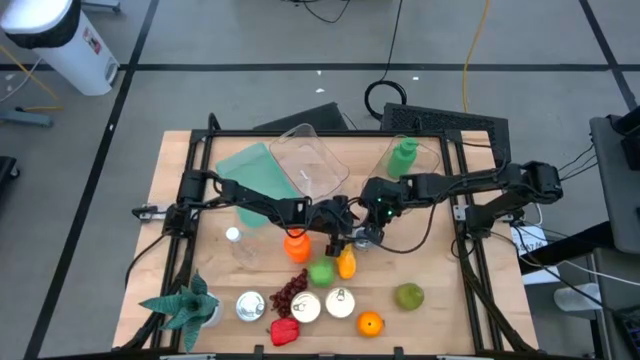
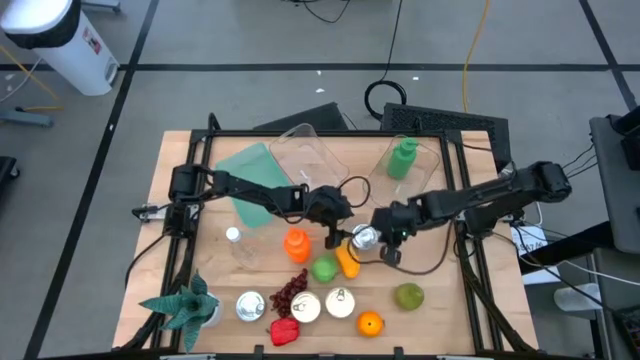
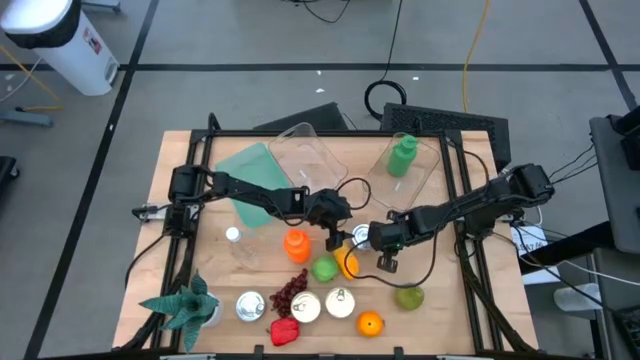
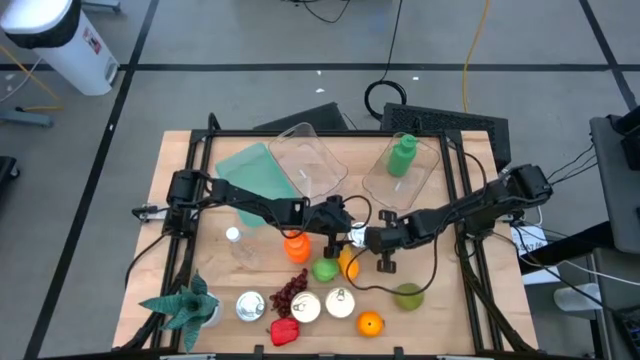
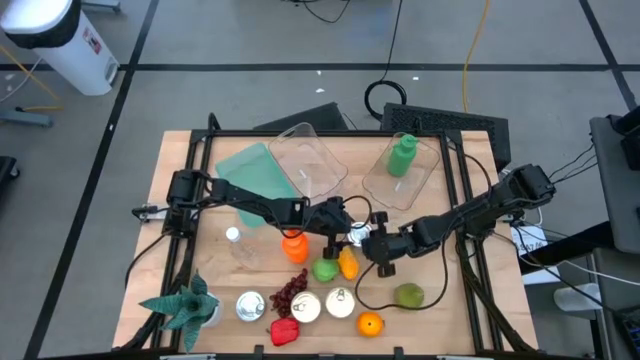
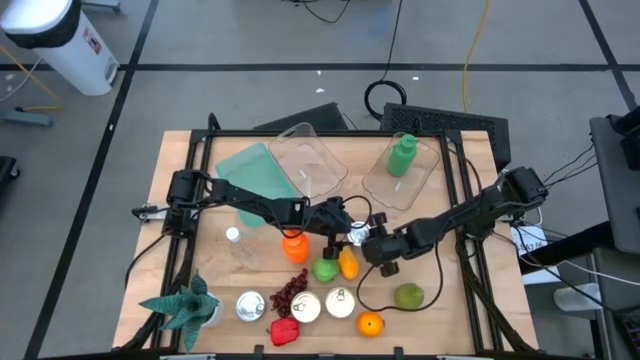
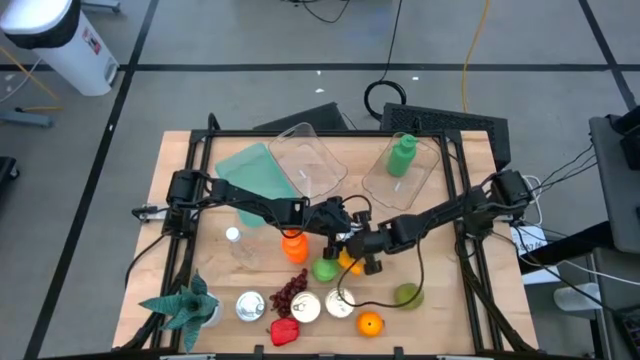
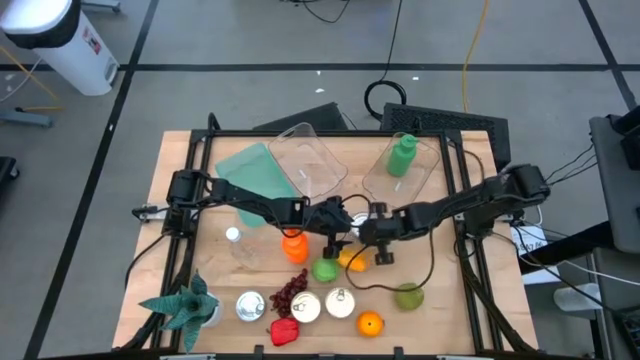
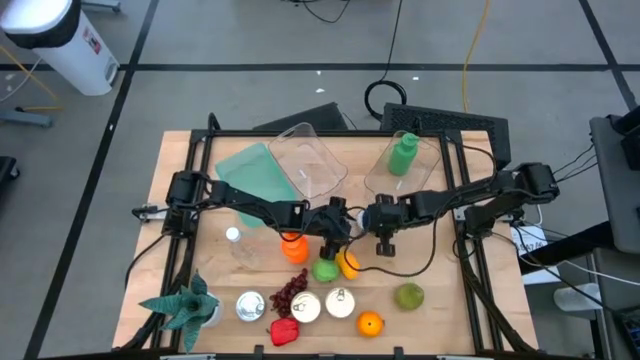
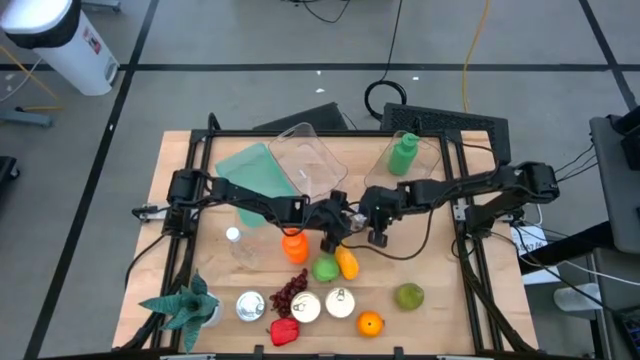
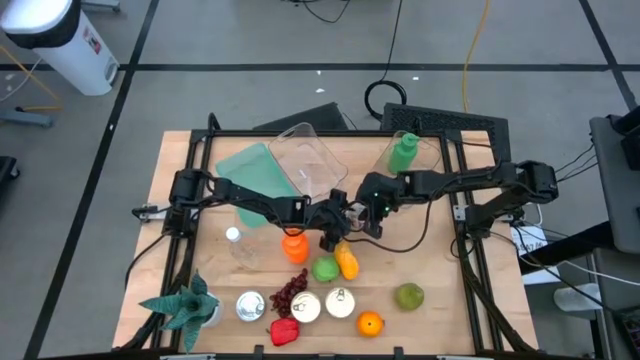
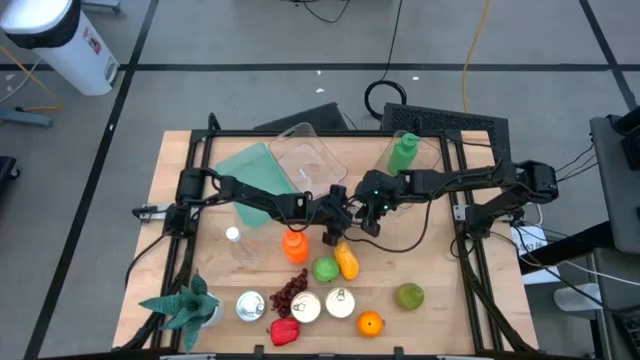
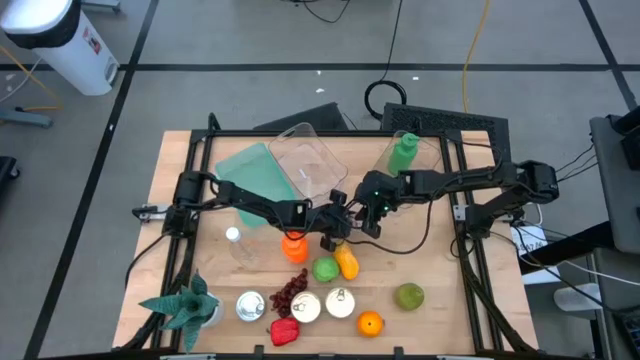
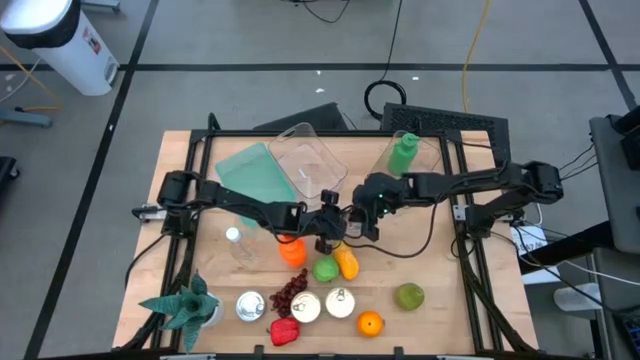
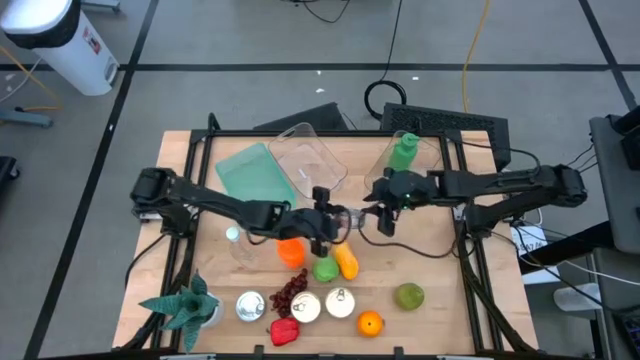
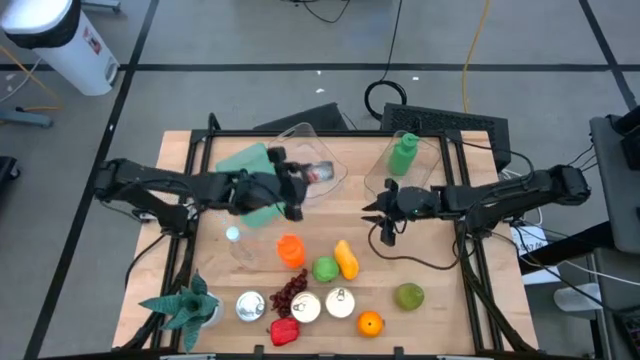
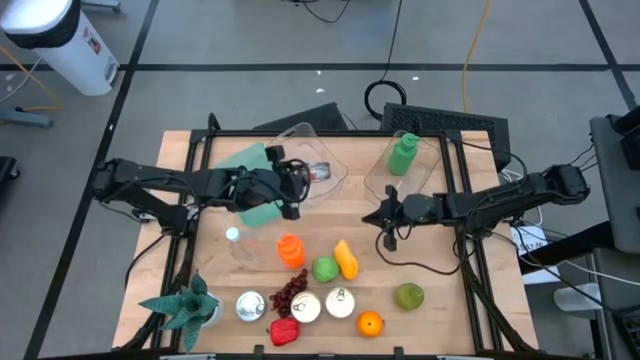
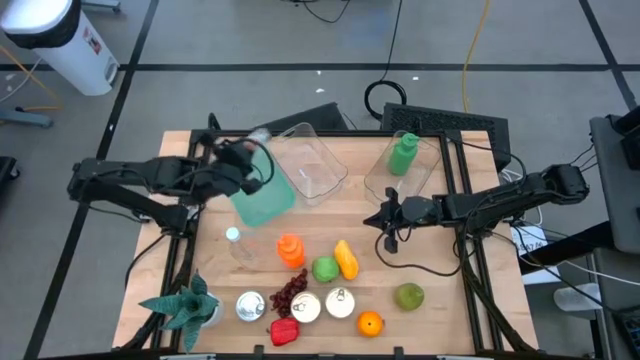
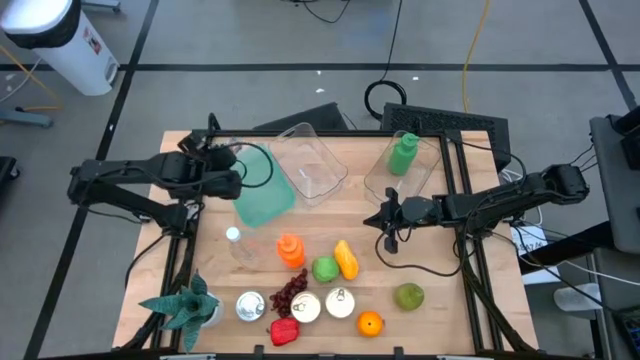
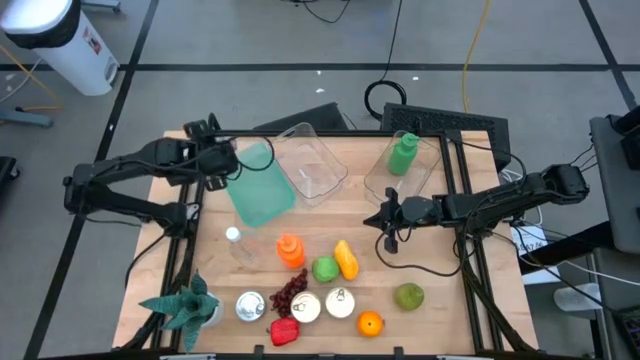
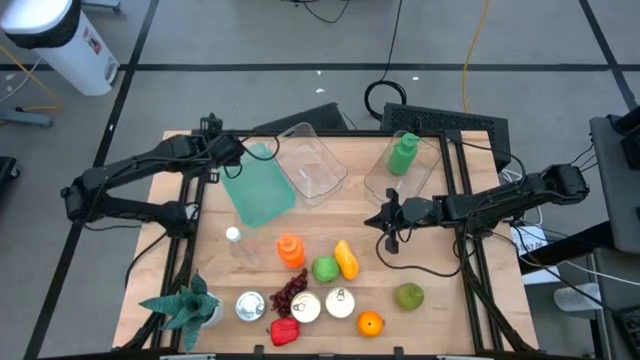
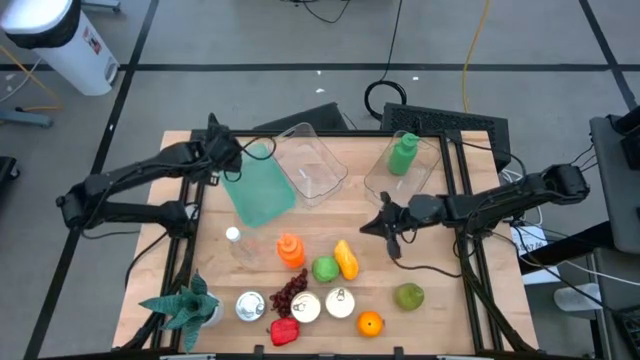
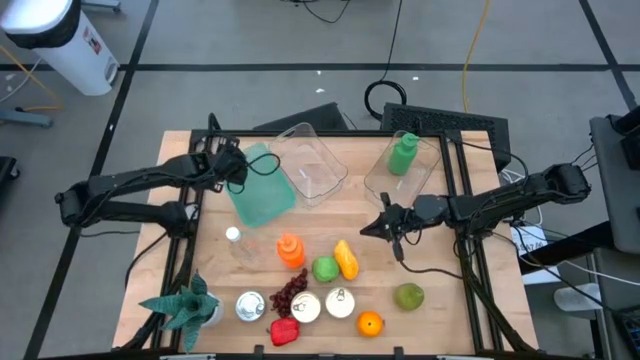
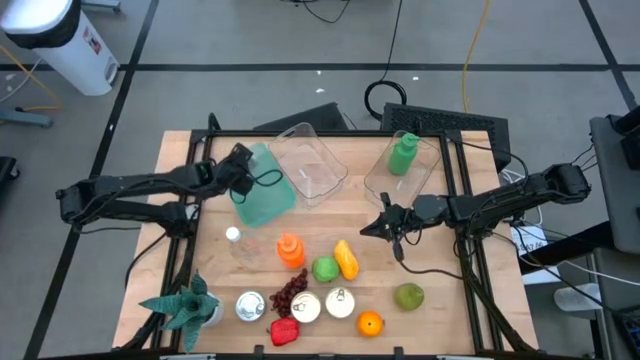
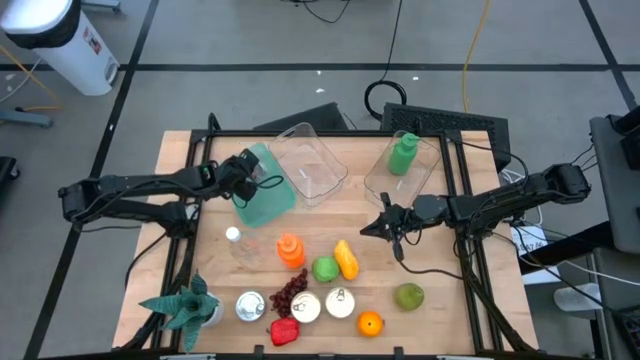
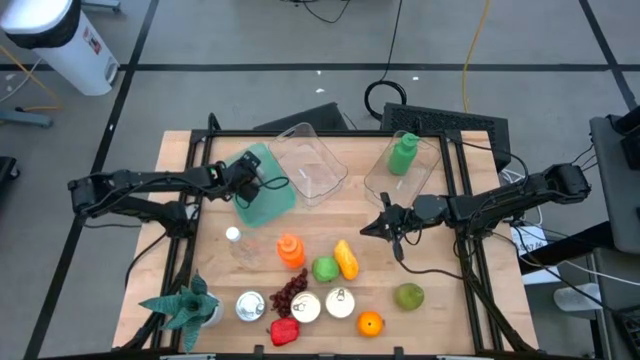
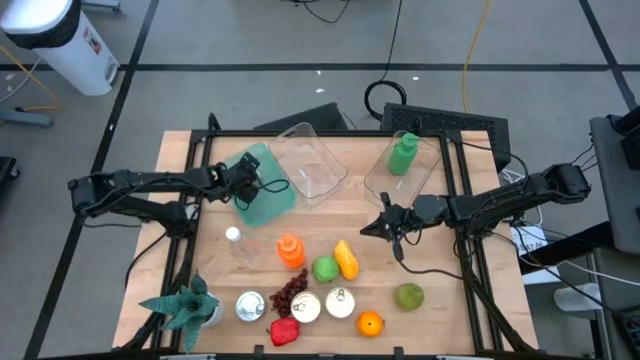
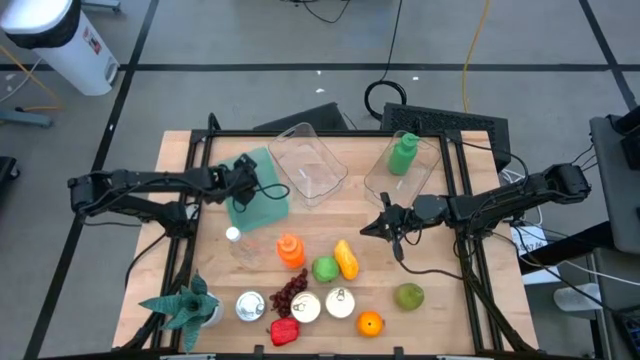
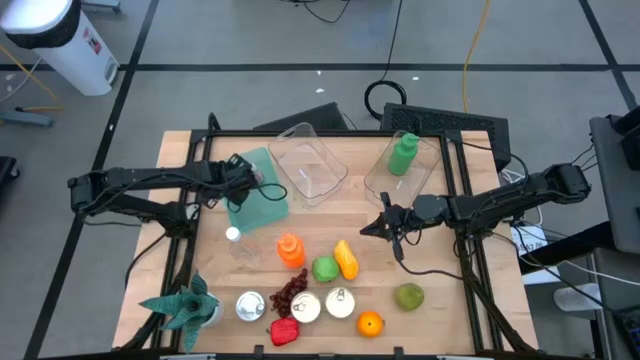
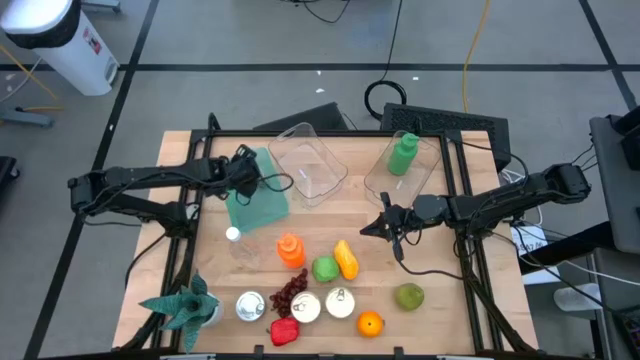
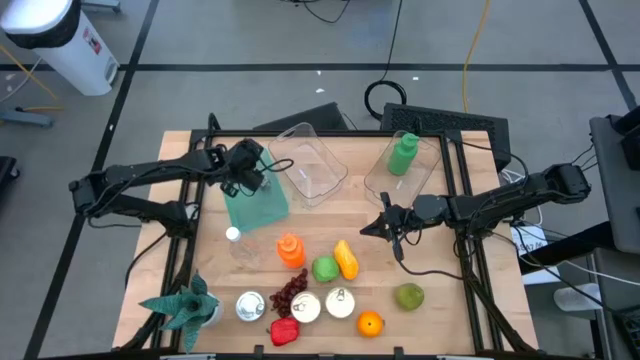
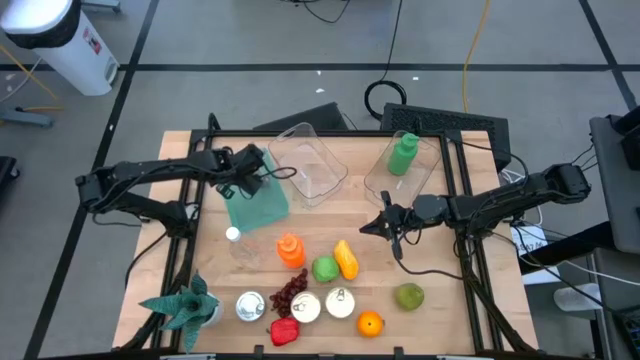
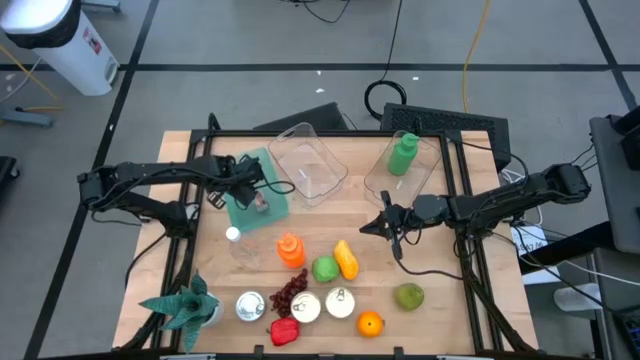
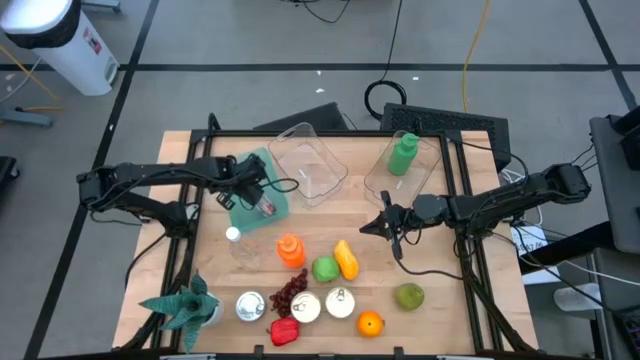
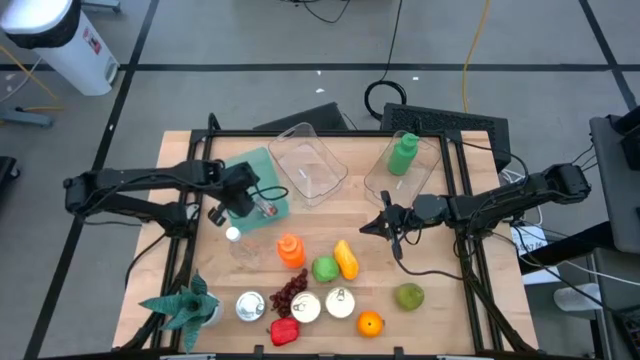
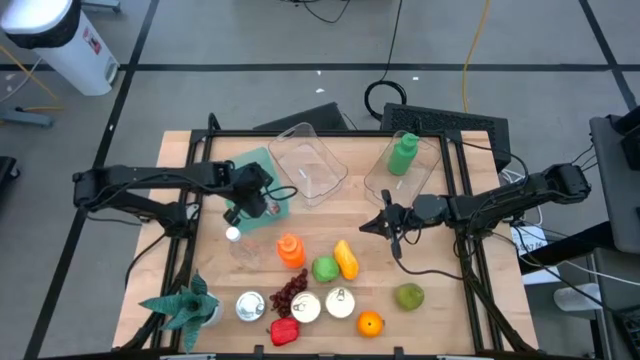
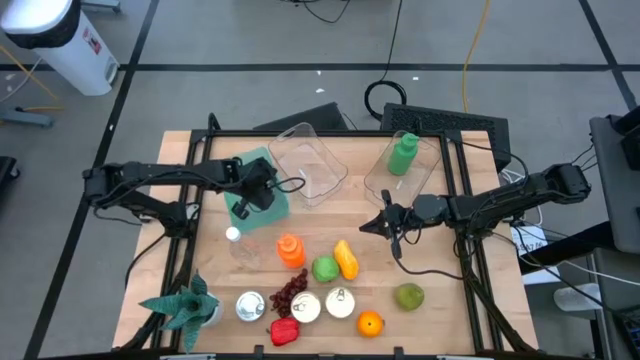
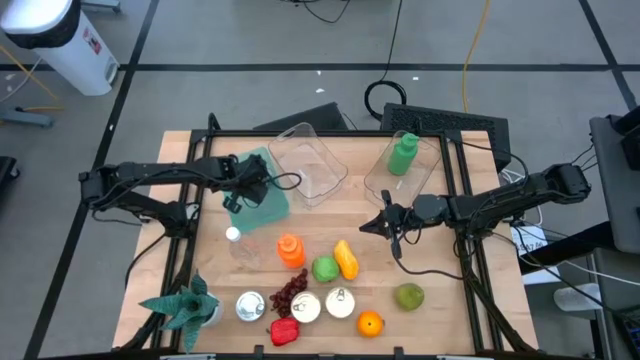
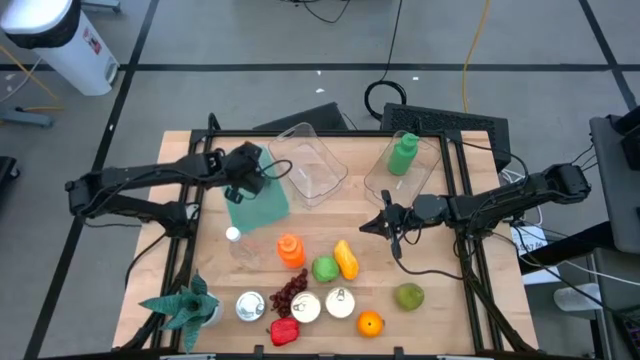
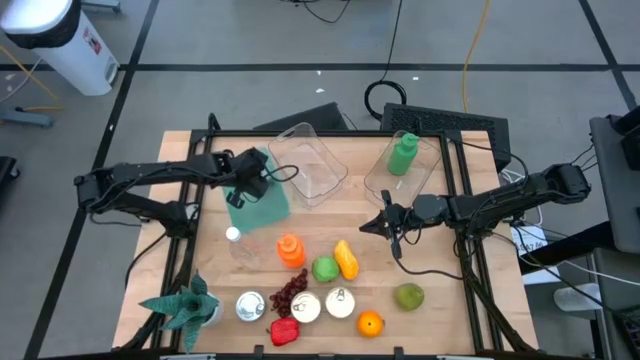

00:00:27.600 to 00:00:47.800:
Task: Pick & Place Food Item
Put the green tuna can into the green bin

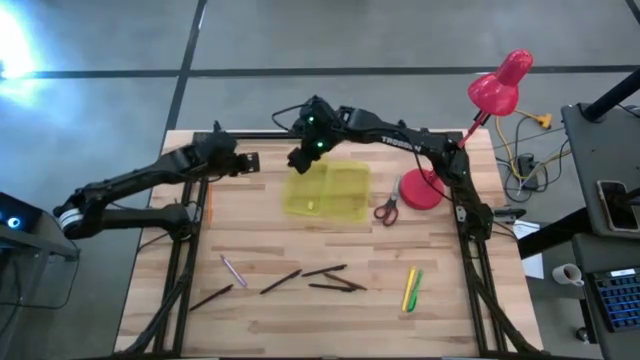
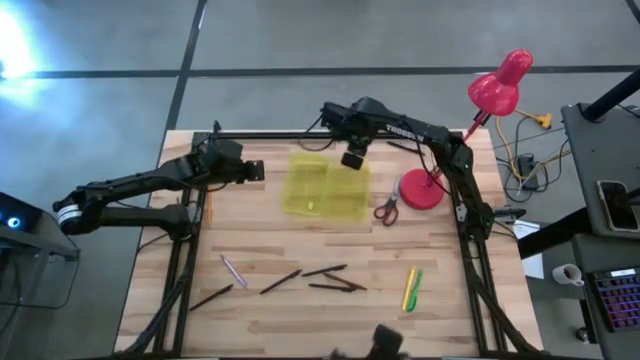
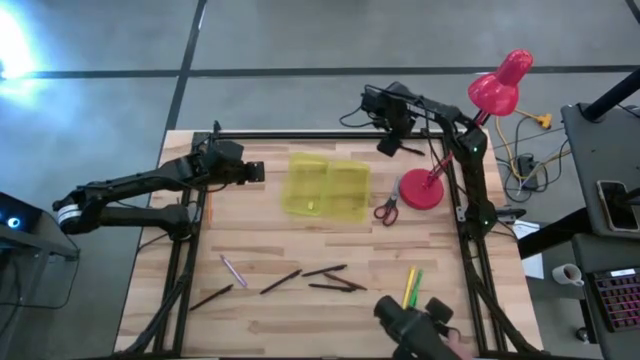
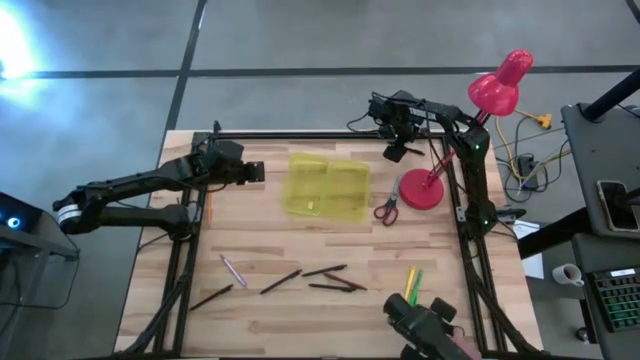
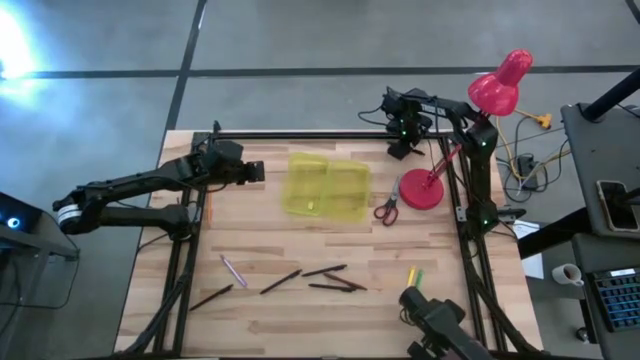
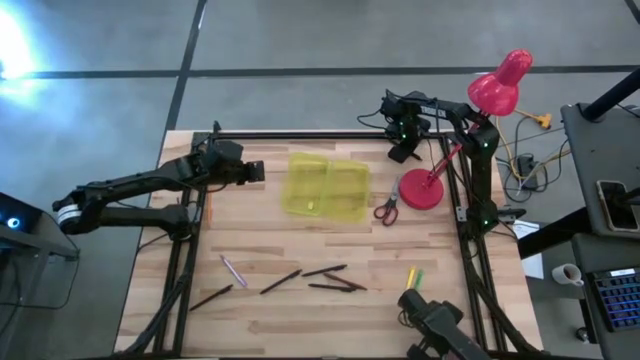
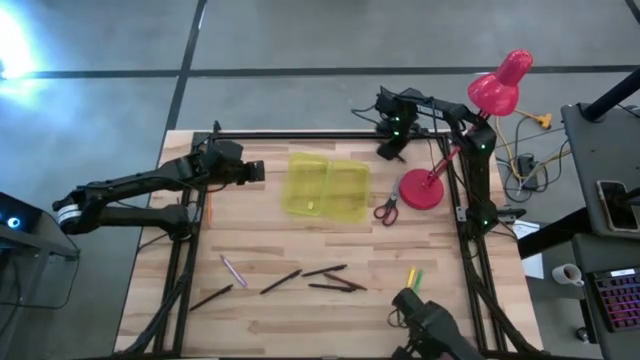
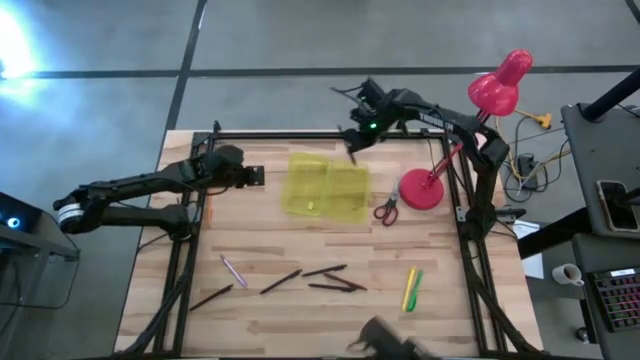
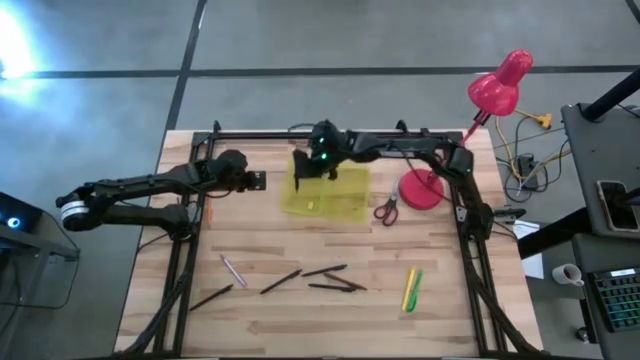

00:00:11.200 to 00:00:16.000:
Task: Pick & place school supplies into a supply box
Put the black pen into the supply box
